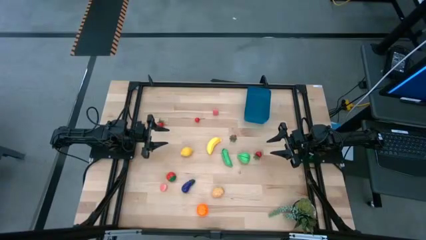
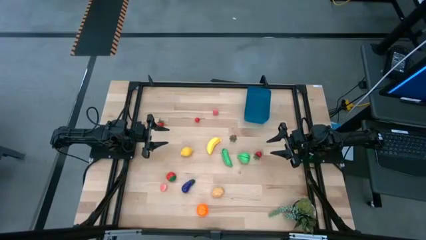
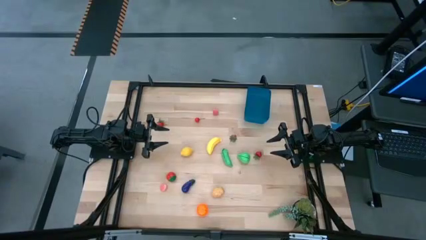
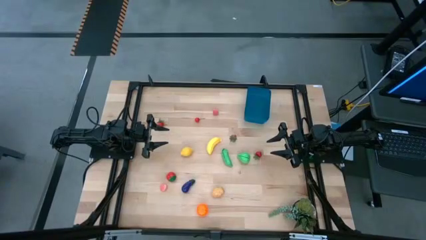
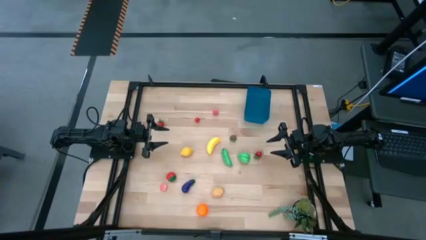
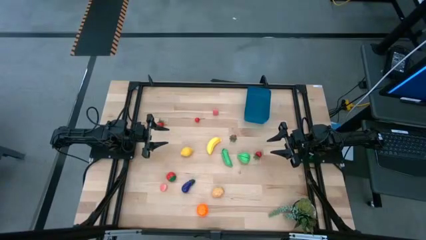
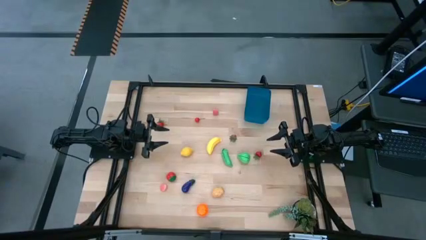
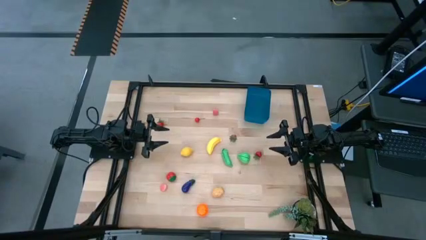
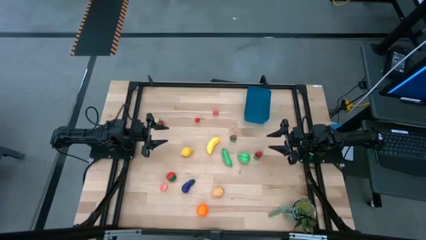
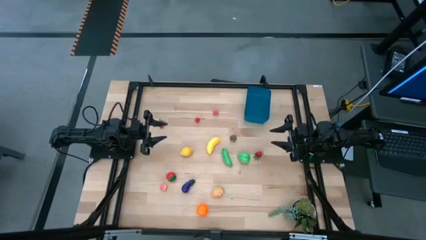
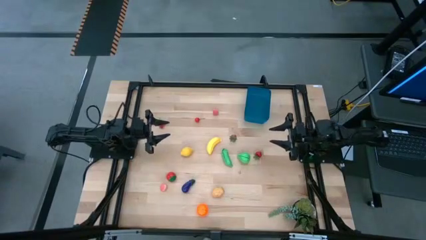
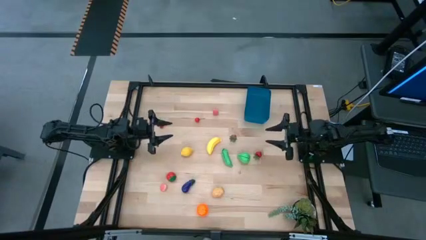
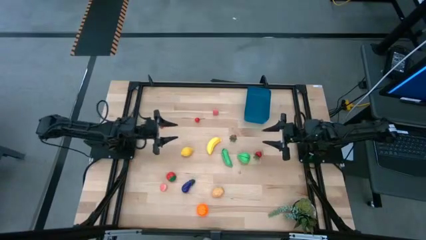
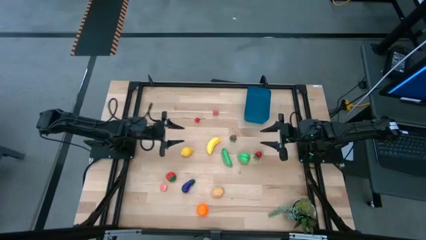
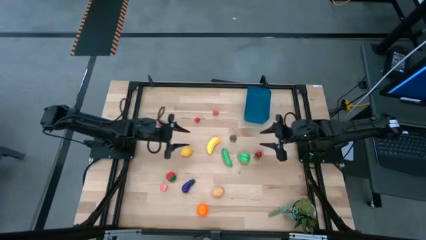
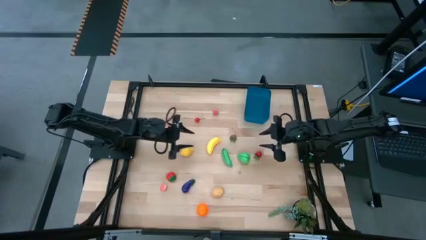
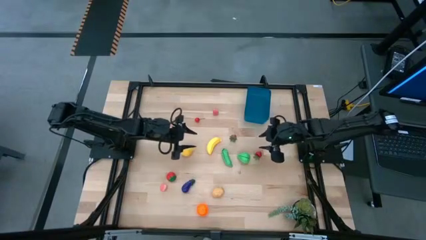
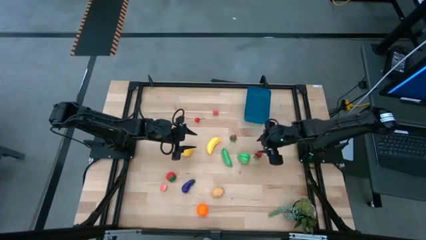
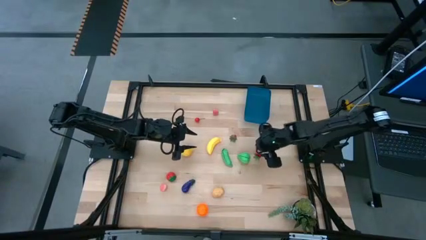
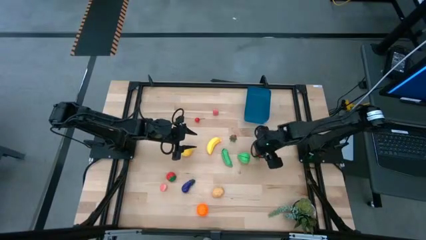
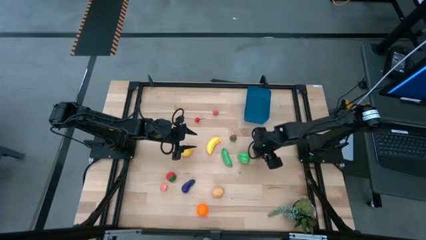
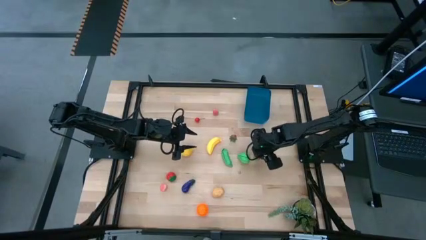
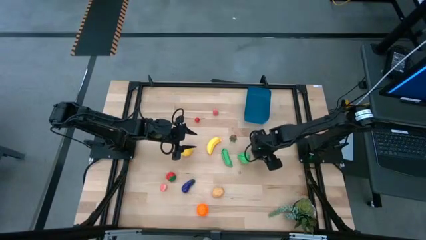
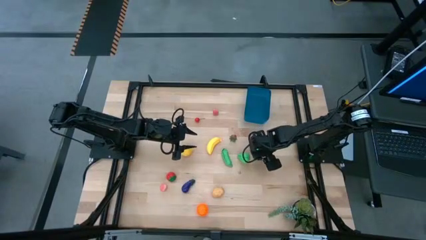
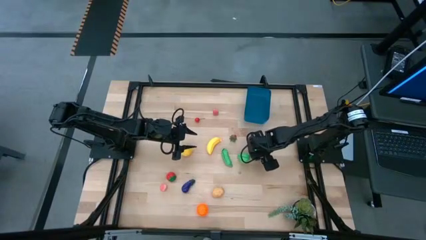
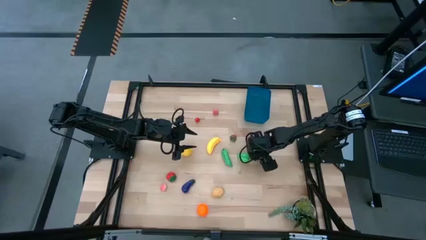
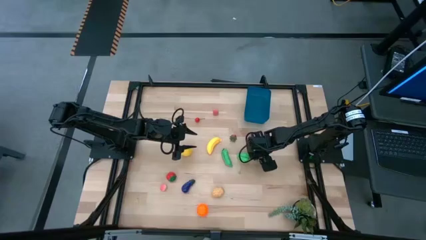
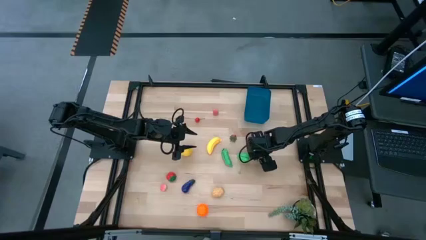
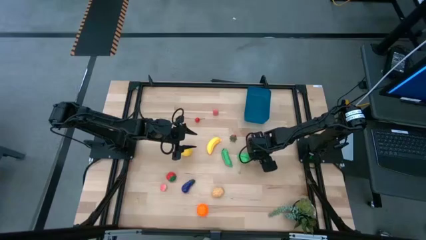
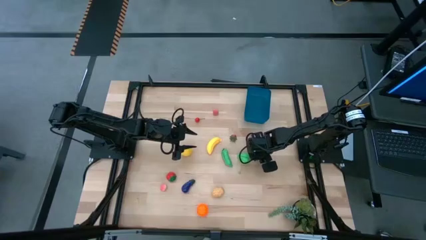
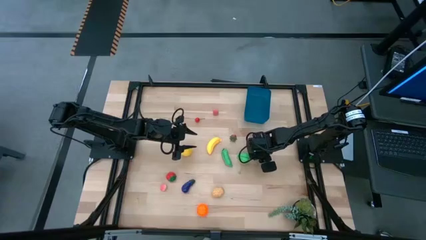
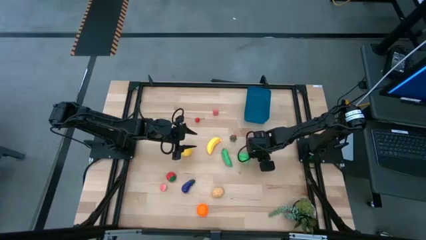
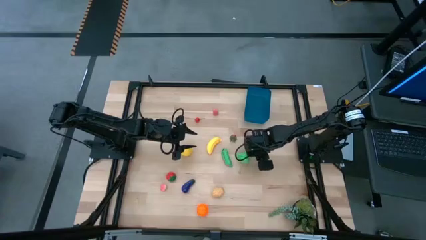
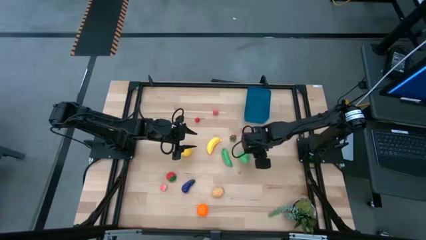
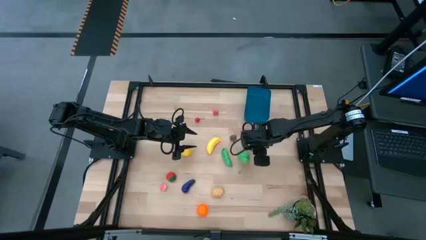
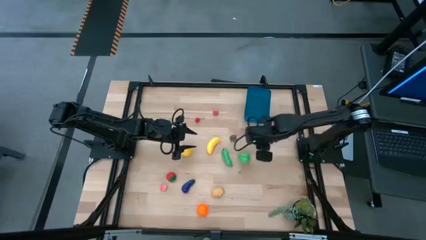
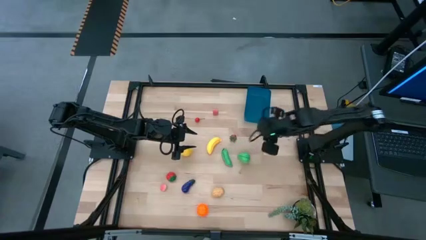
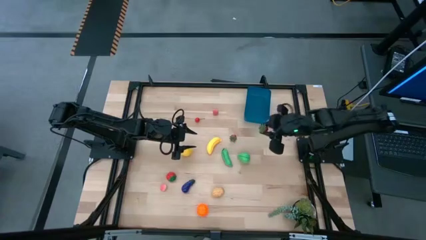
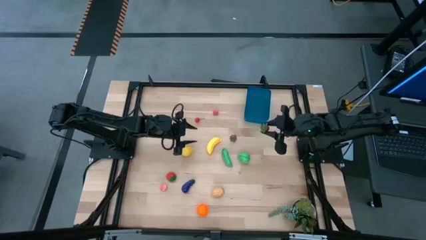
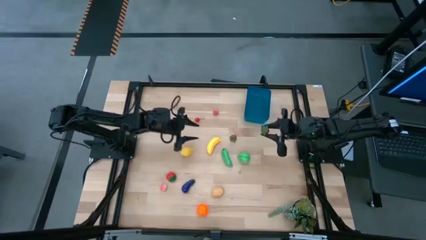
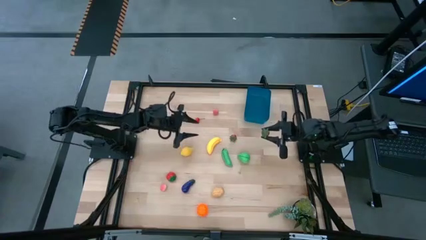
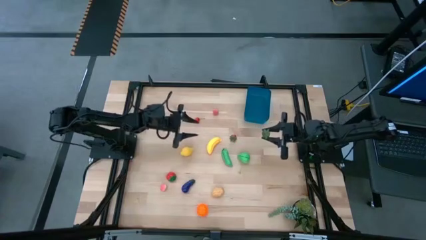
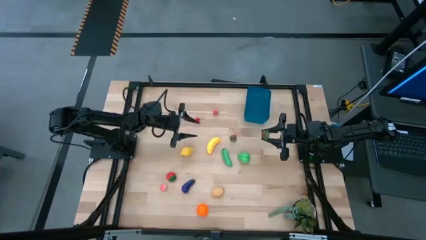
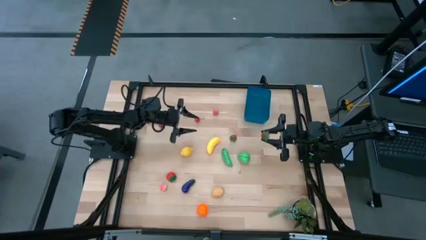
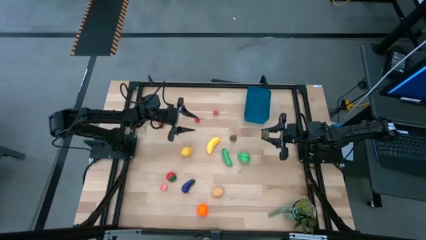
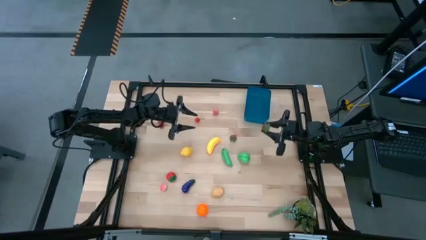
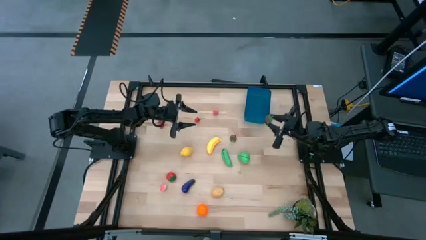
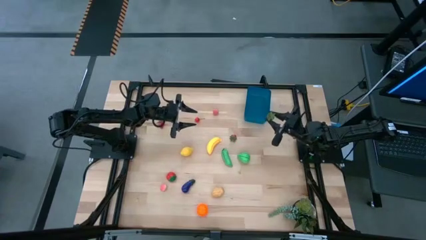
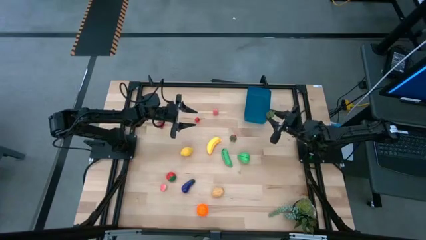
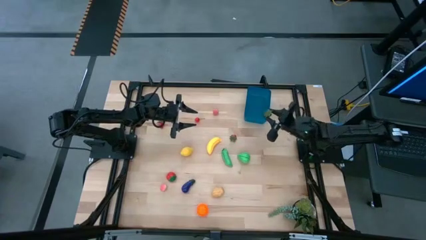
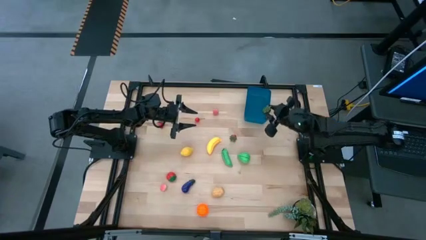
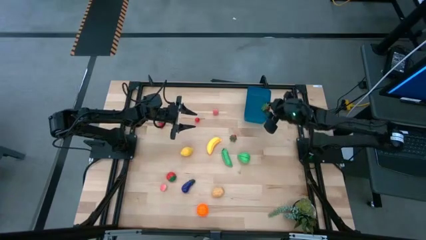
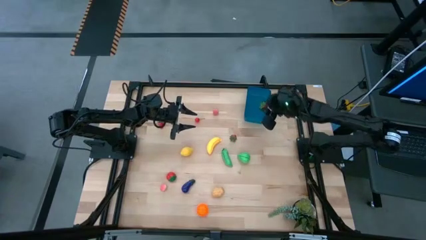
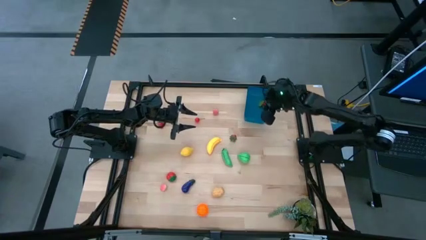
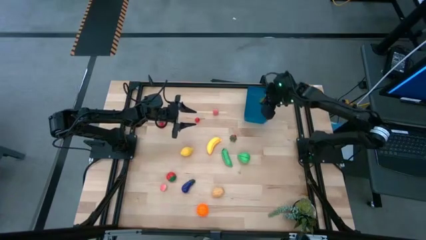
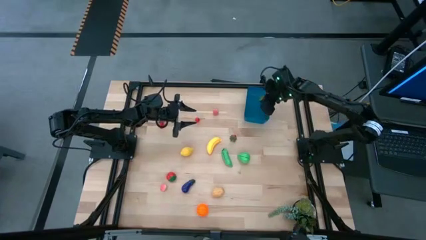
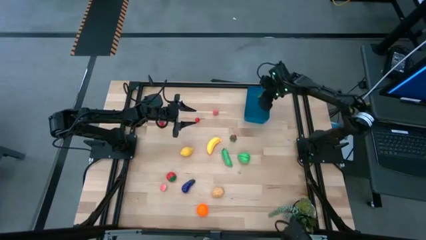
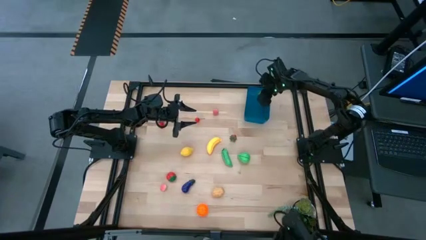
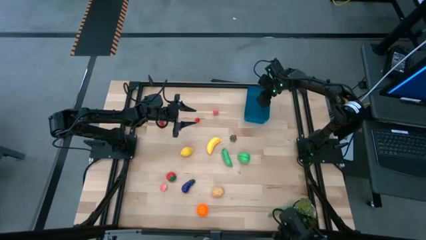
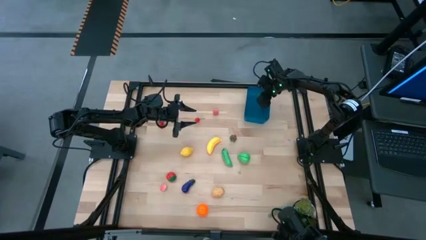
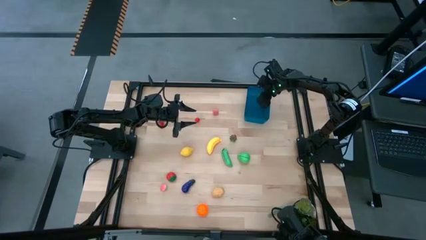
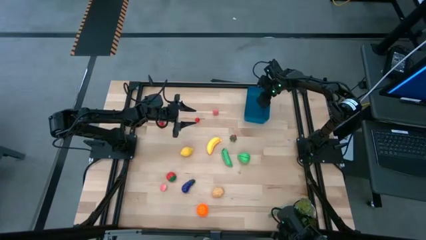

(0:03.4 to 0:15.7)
Task: Pick and placing Produce into tupperware
Put the red strawberry into the blue bin

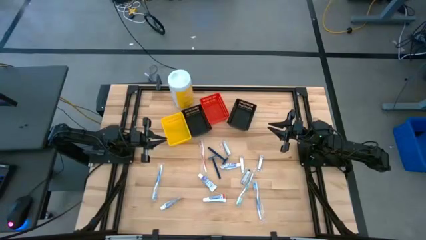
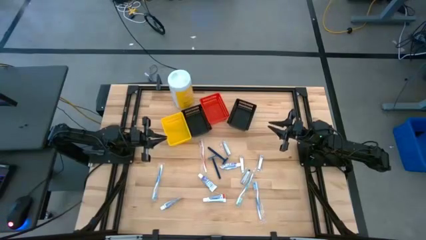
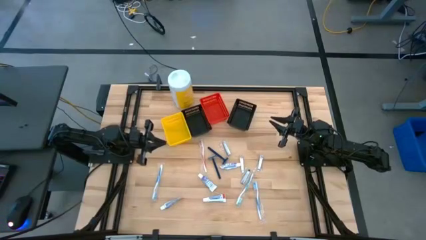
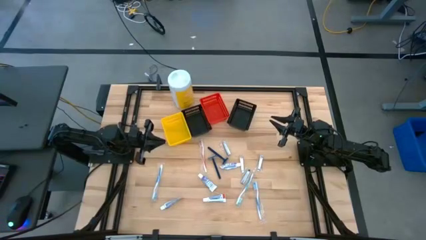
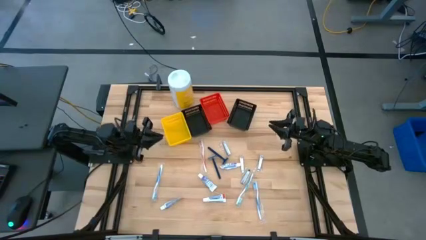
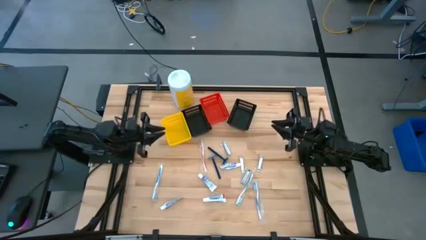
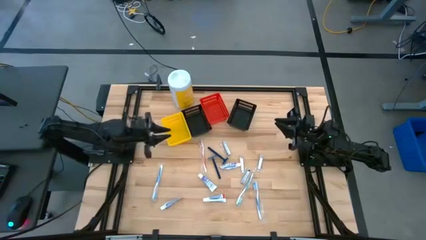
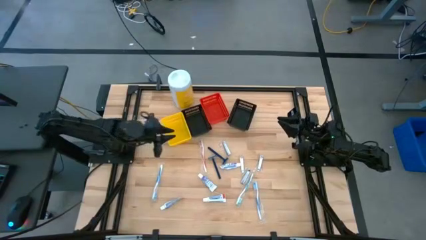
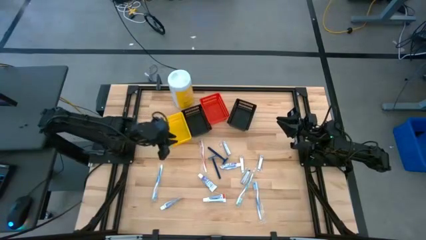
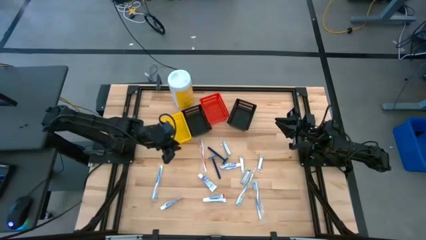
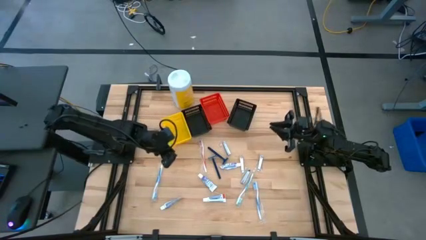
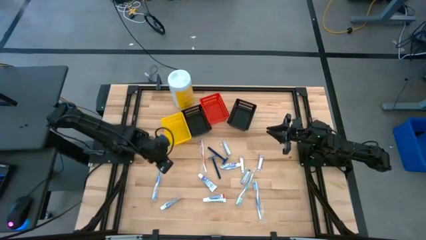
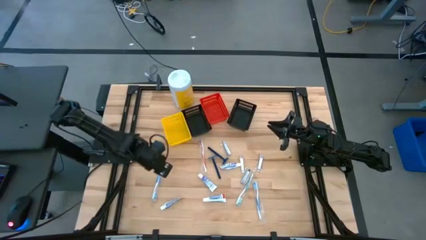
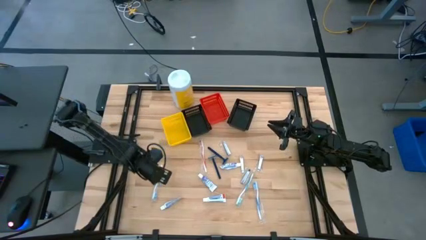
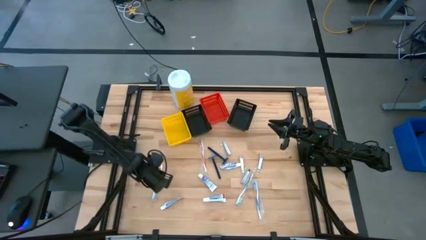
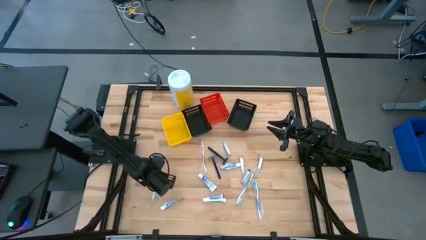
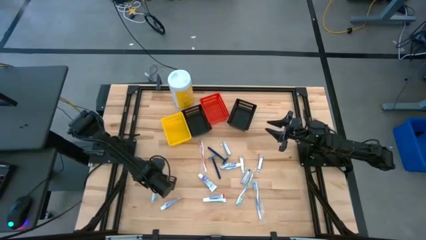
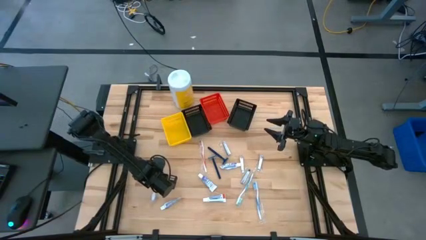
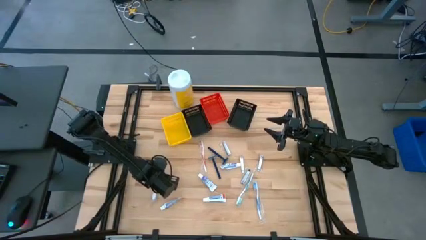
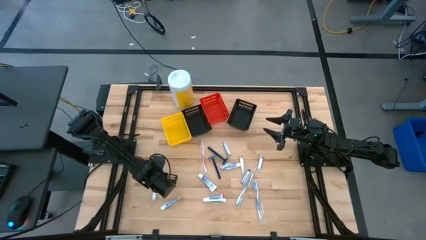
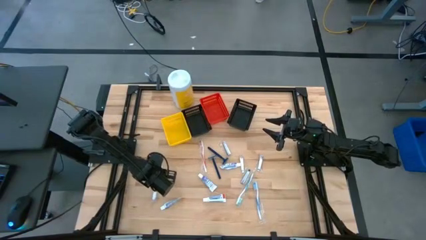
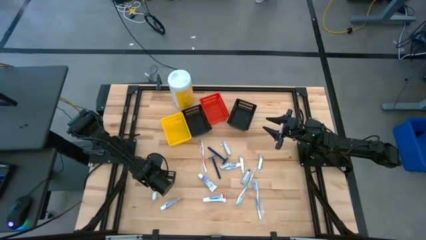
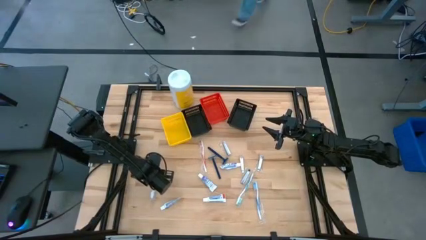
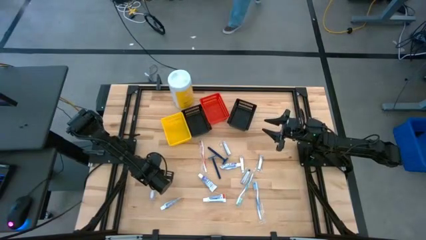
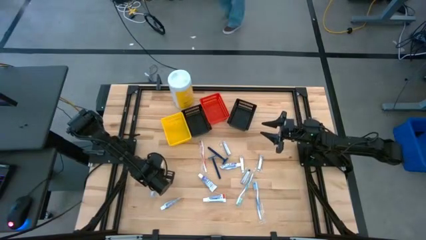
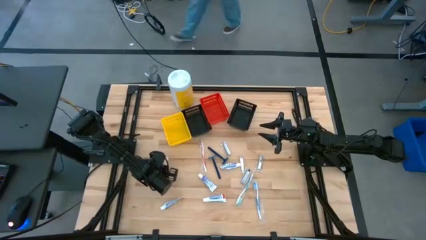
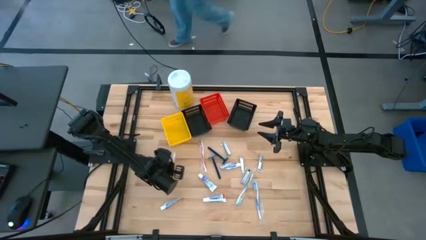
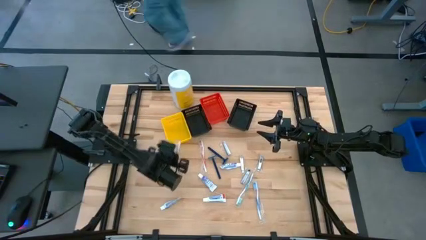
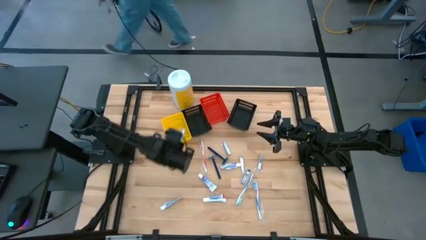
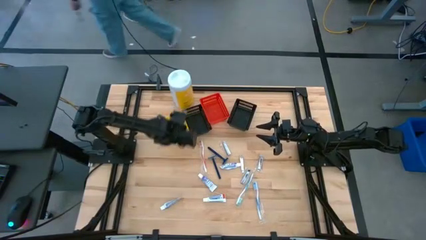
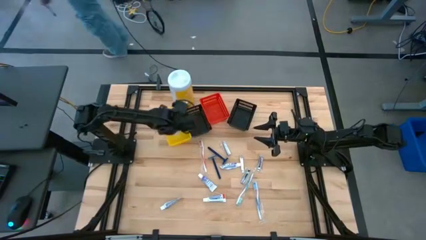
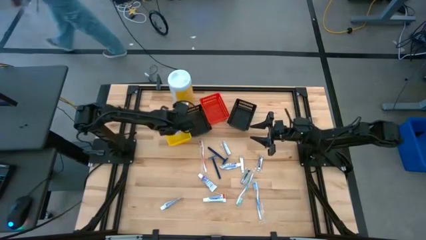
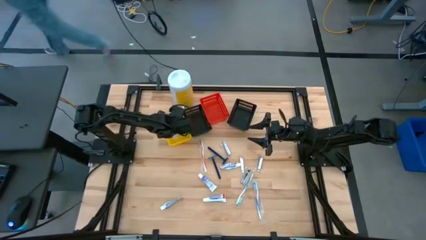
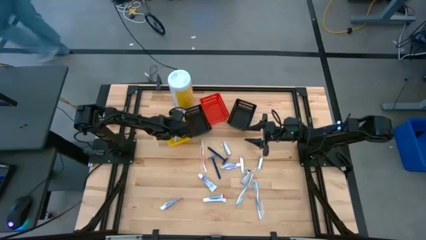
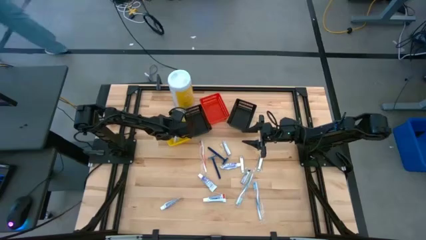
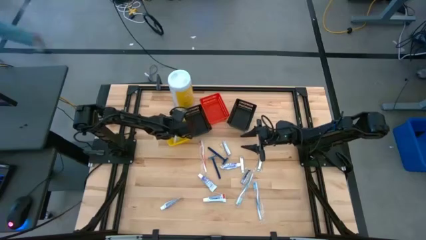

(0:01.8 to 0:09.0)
Task: Pick & Place Travel size toiletries
Put the blue toothbrush into the yellow bin
